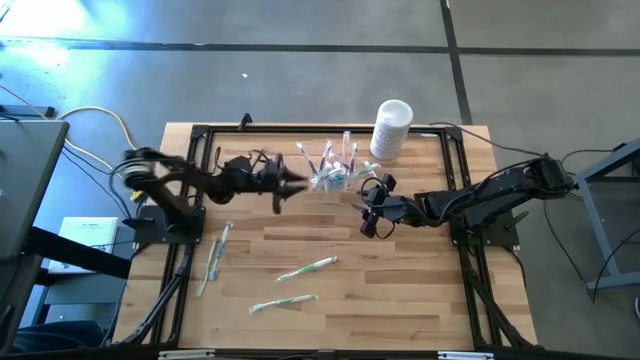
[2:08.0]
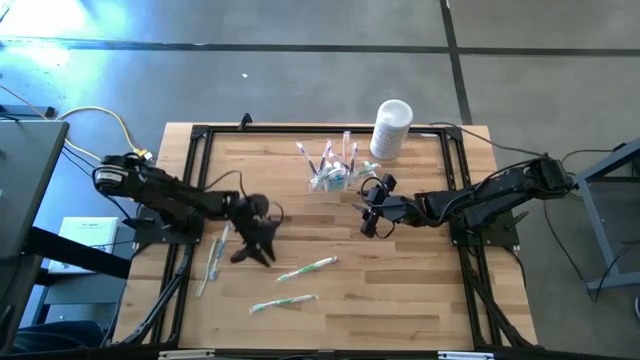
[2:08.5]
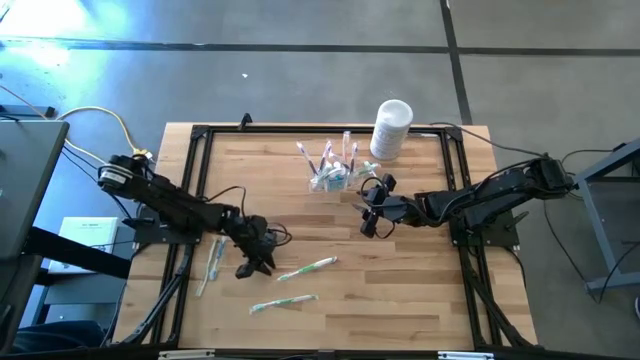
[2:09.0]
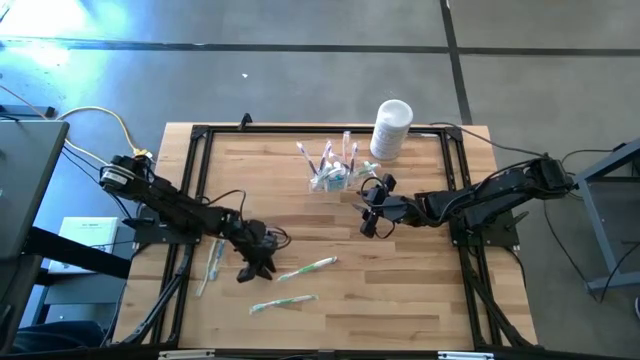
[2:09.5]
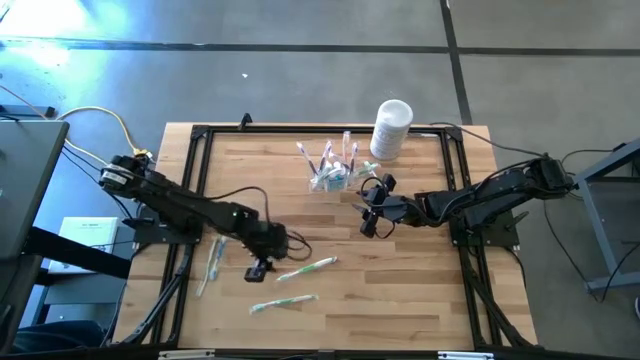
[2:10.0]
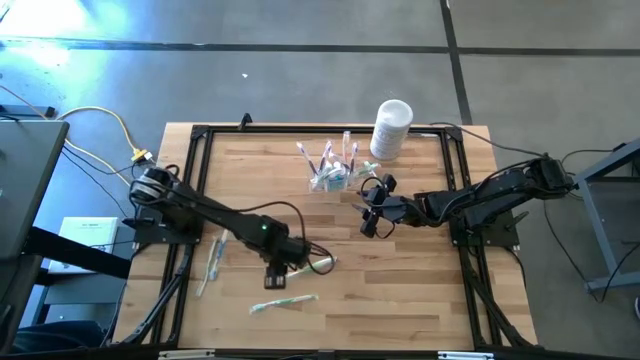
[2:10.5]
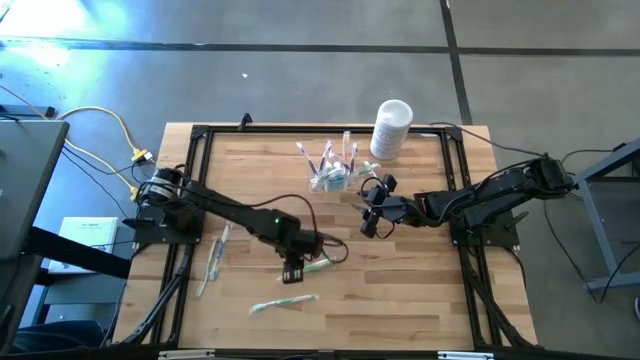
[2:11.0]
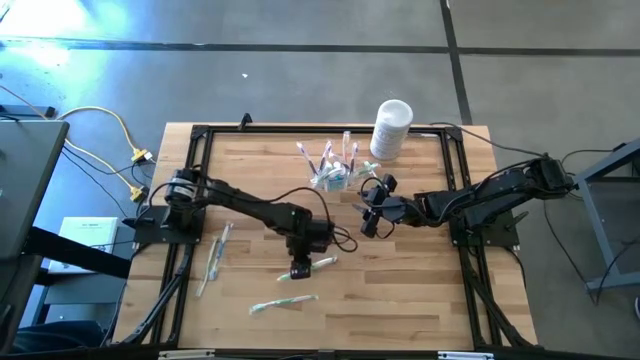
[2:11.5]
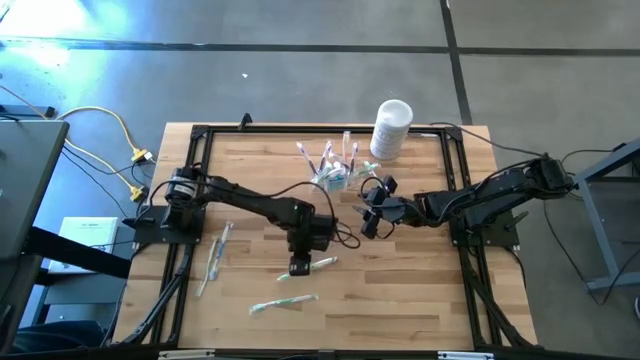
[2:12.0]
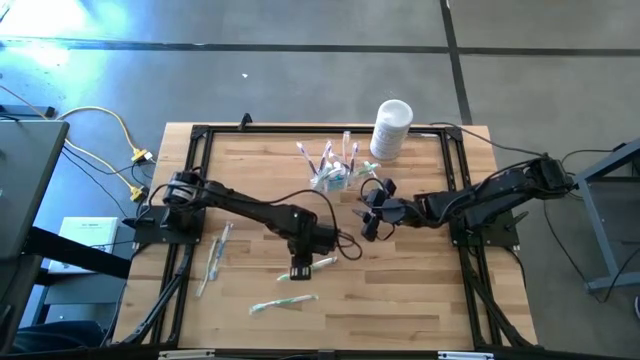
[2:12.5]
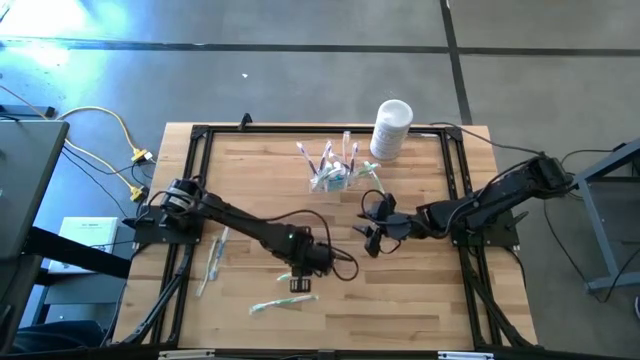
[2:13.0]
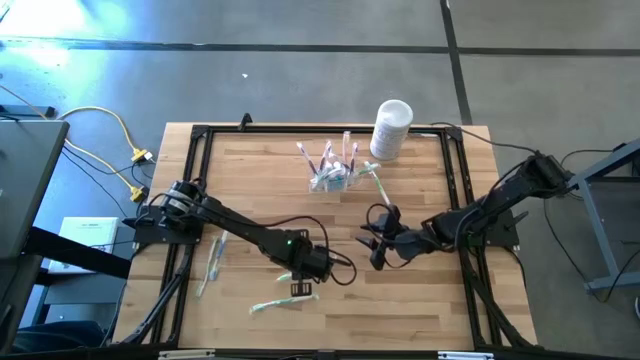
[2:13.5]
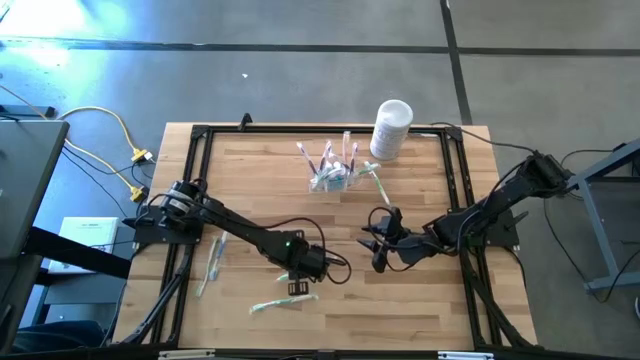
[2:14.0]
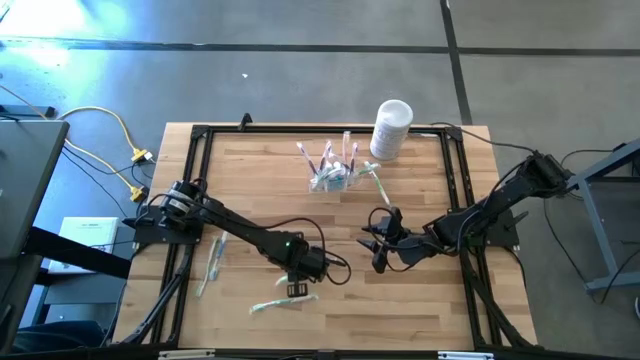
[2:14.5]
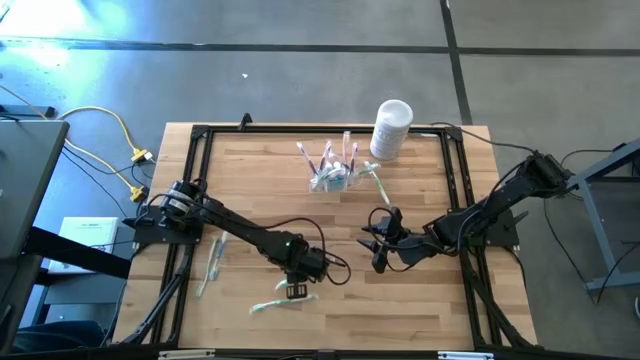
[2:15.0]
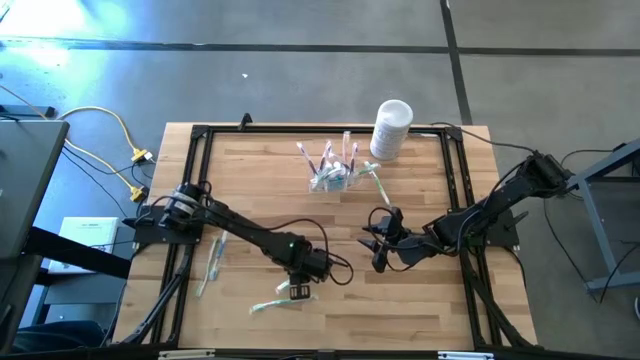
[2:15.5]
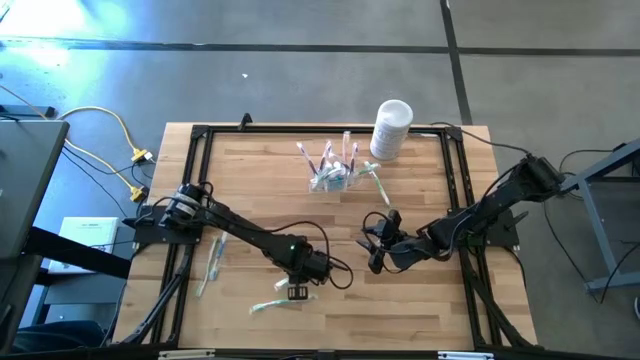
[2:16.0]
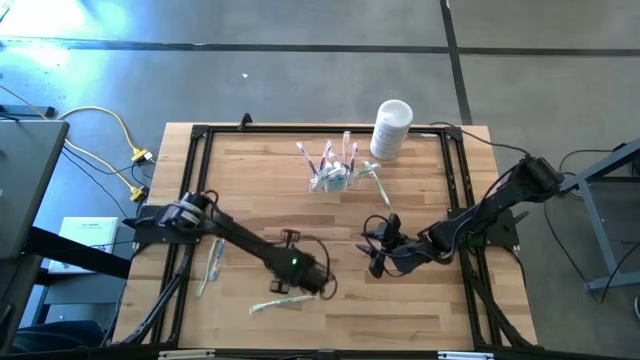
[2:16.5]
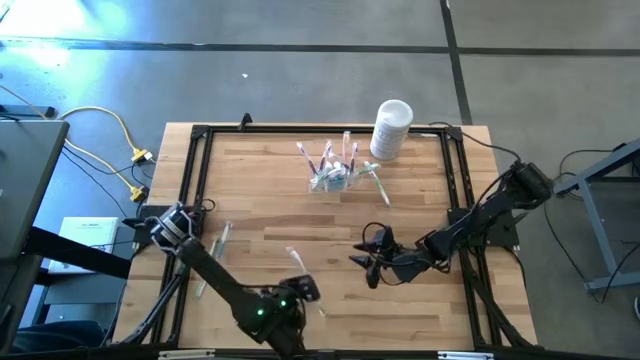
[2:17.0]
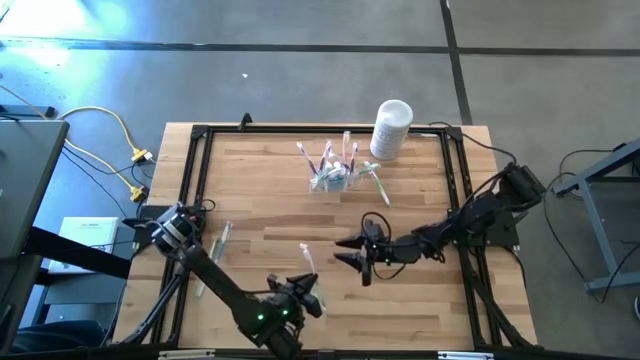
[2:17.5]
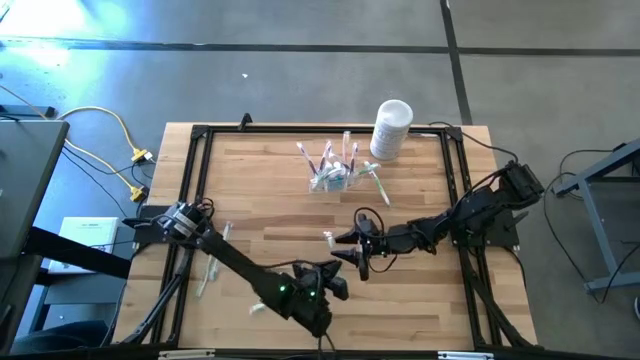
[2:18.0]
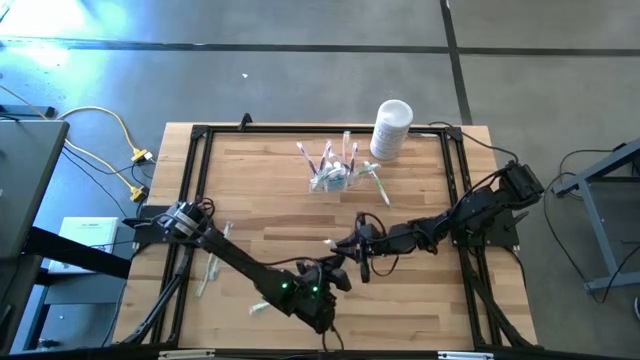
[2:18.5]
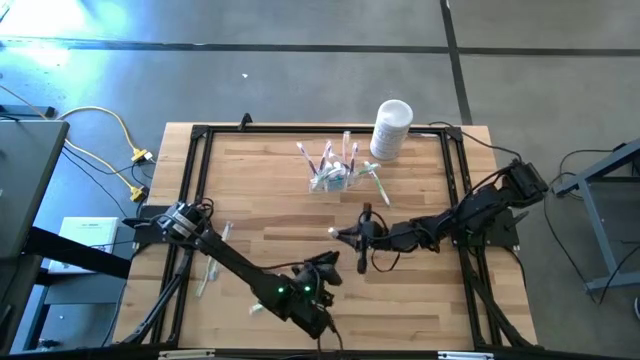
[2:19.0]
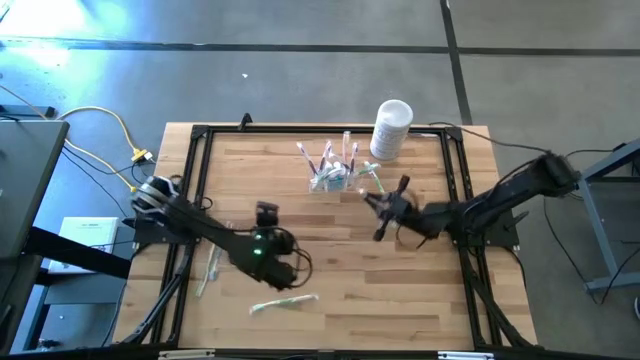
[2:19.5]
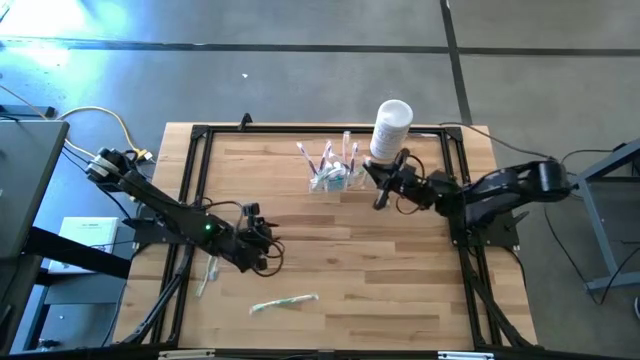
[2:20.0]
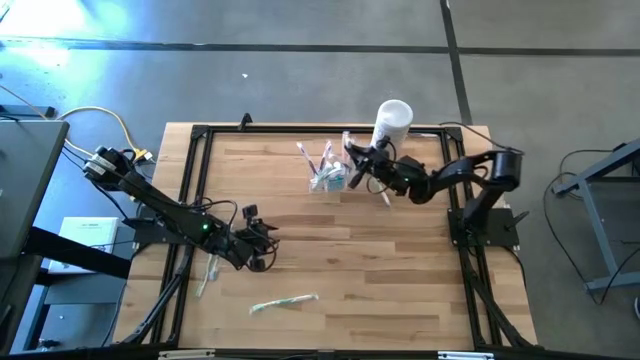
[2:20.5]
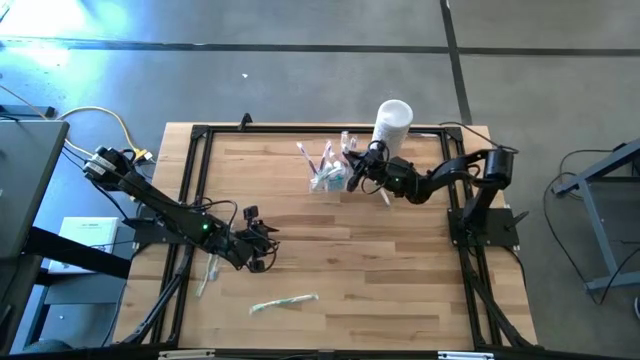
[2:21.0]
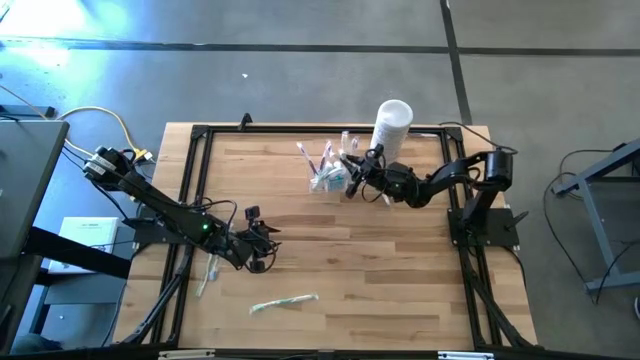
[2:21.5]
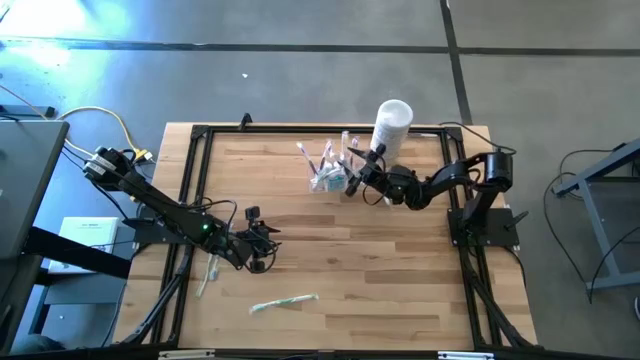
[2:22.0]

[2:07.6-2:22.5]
Task: Pick & Place toothbrushing station
Put the green toothbrush into the transparent organizer

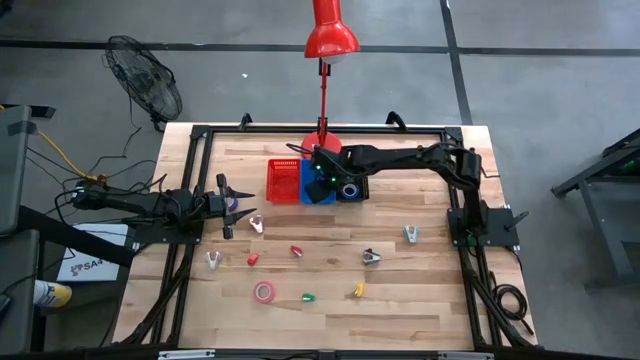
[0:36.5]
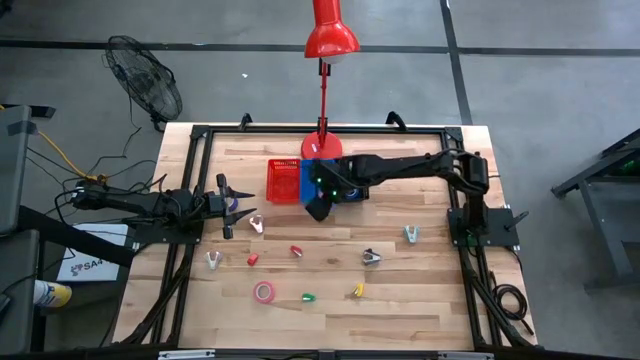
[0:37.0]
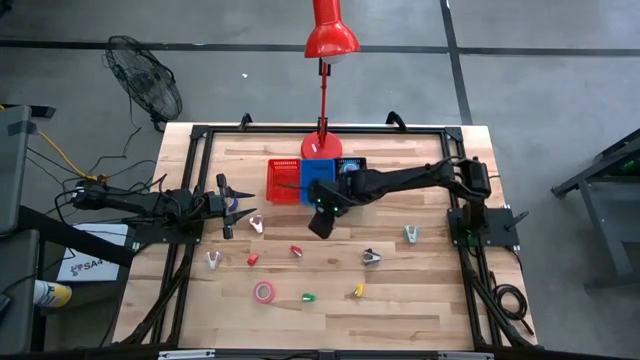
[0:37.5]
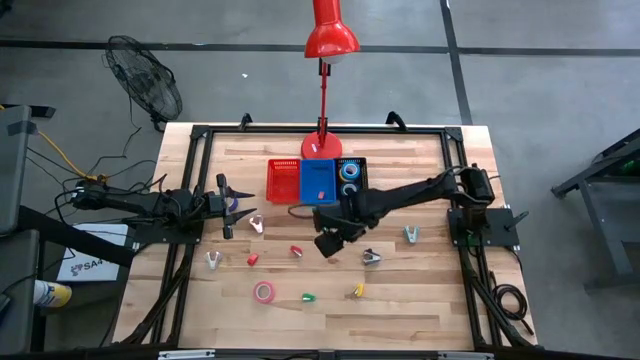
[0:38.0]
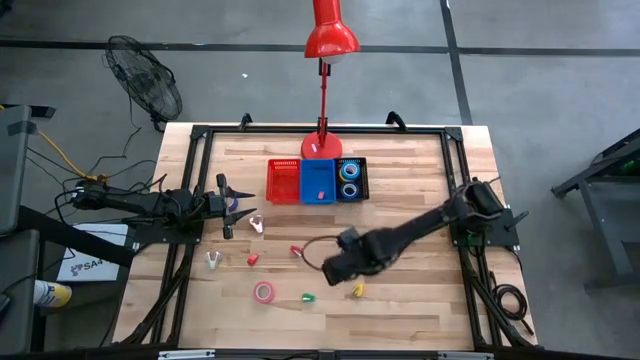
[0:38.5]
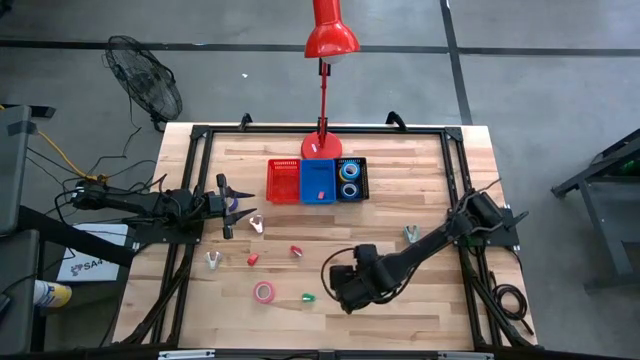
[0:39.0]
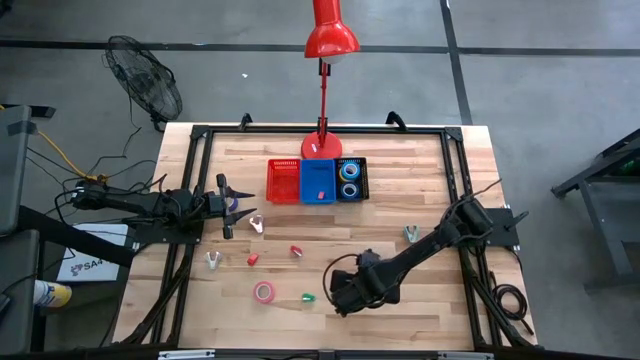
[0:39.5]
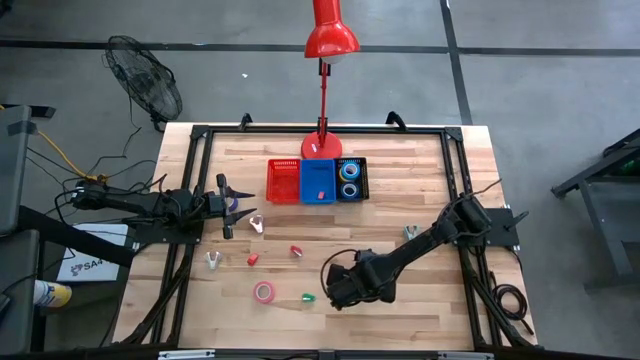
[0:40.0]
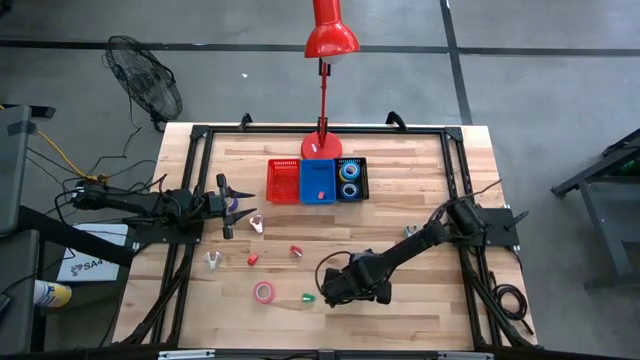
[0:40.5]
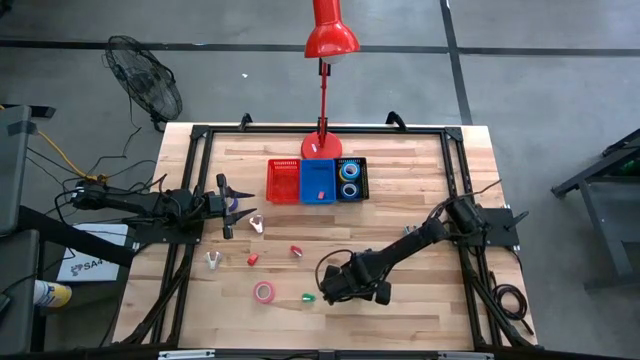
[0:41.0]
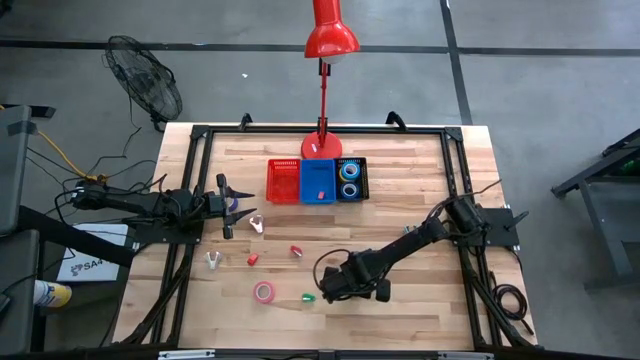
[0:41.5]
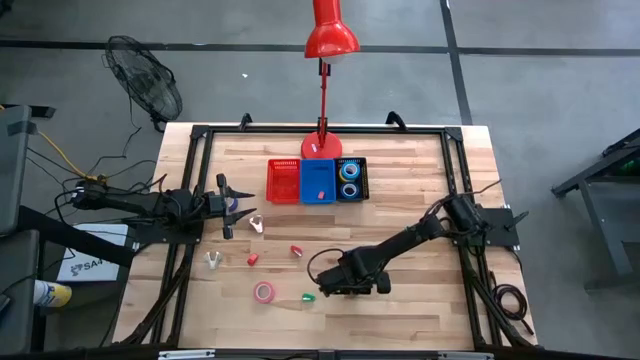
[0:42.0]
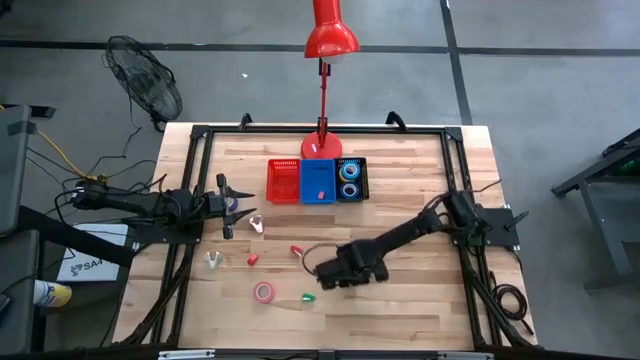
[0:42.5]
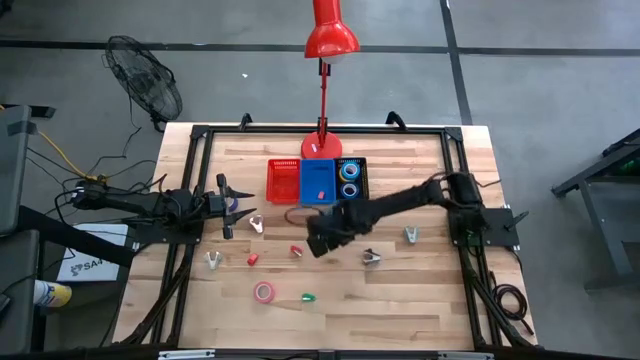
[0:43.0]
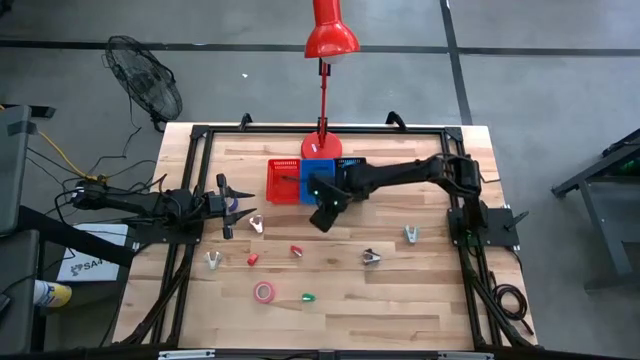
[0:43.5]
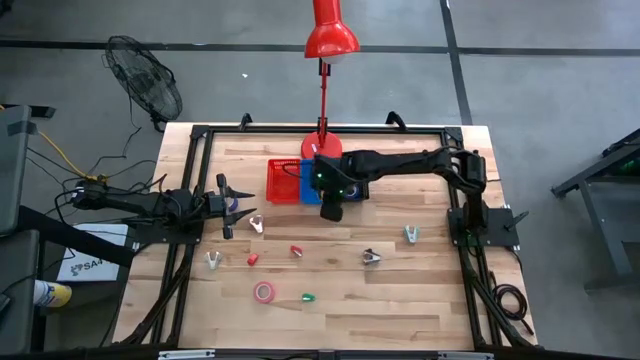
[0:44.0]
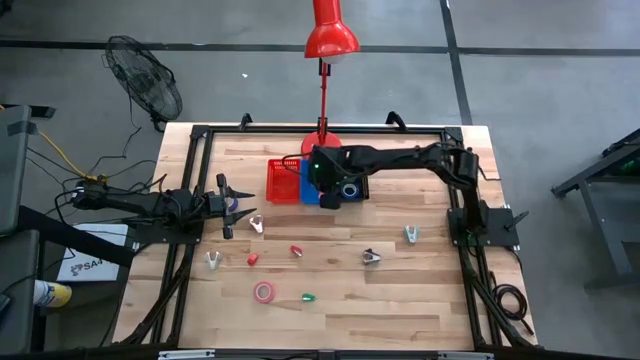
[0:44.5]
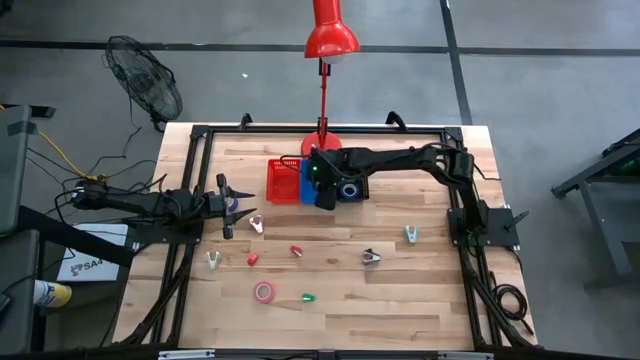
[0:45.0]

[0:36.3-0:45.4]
Task: Pick and place Stapler, Stapler remover, tape
Put the yellow stapler into the blue basket
